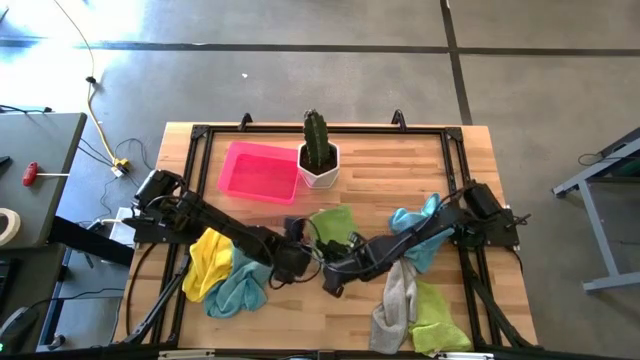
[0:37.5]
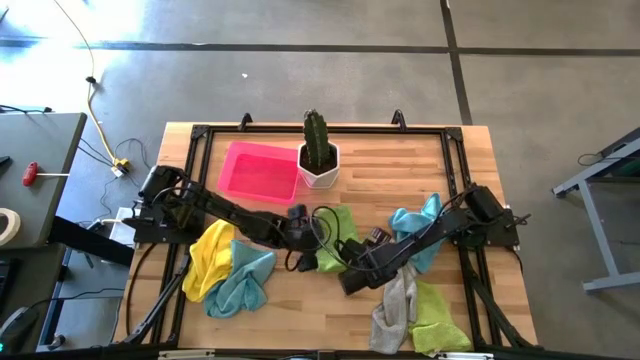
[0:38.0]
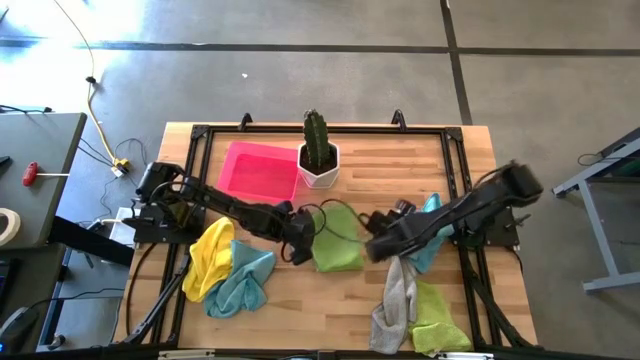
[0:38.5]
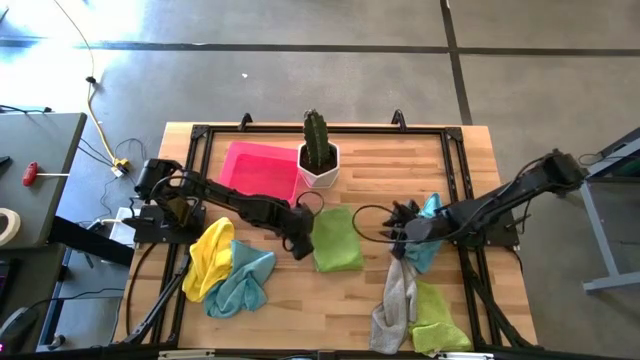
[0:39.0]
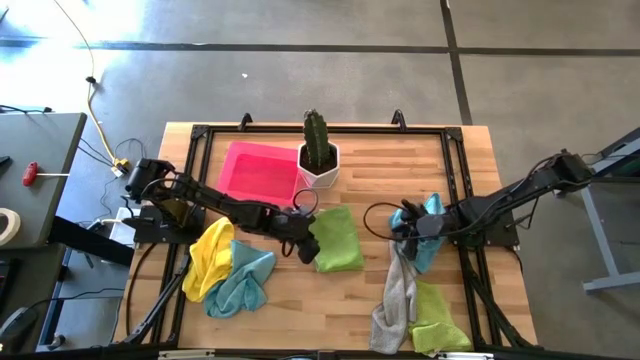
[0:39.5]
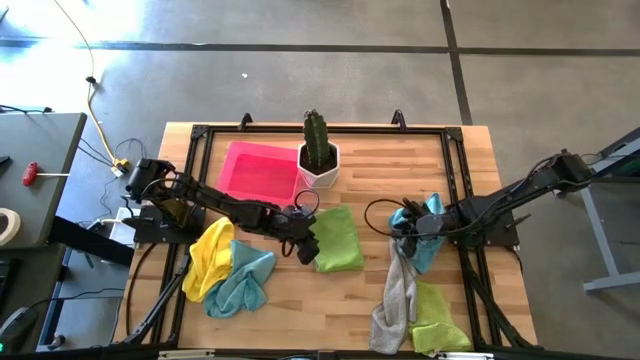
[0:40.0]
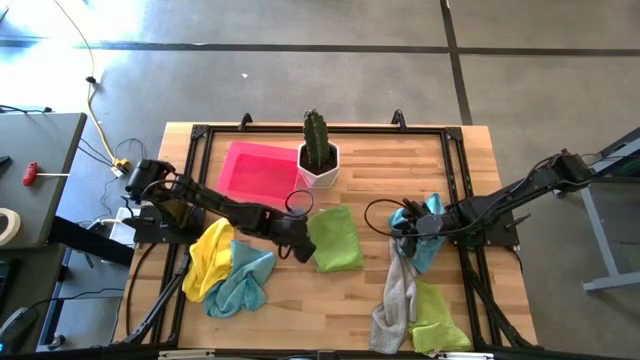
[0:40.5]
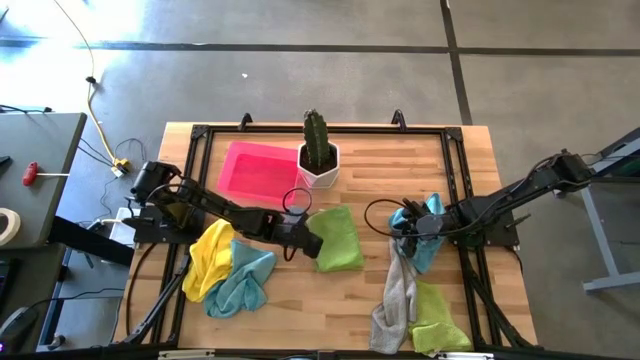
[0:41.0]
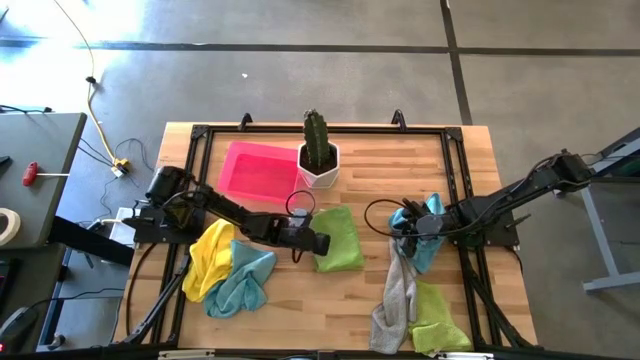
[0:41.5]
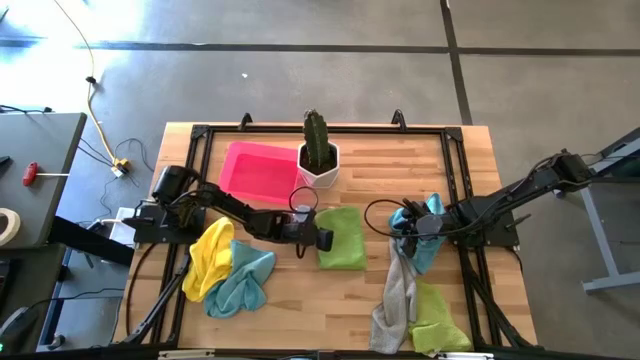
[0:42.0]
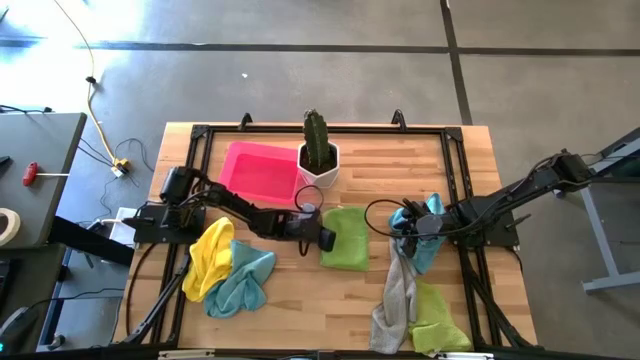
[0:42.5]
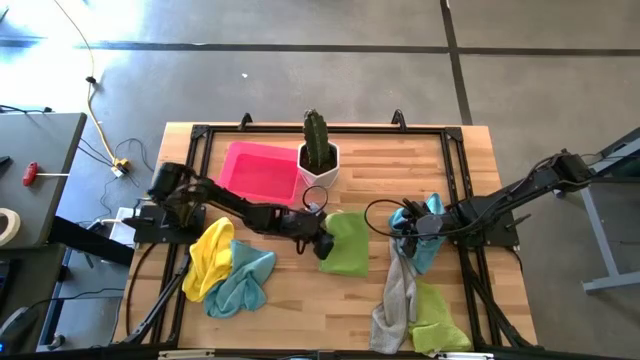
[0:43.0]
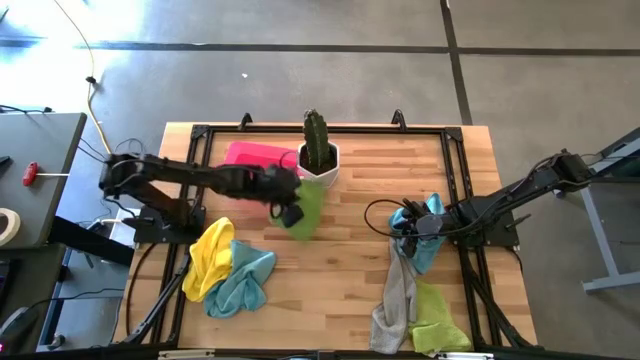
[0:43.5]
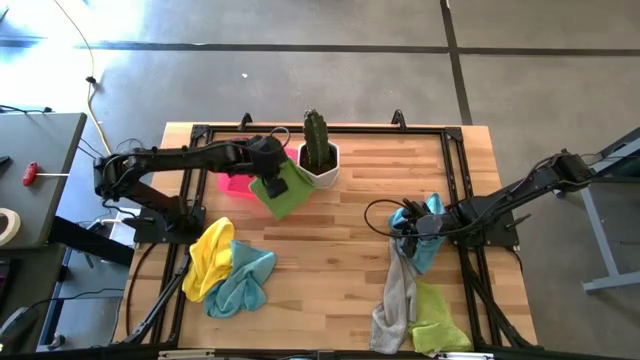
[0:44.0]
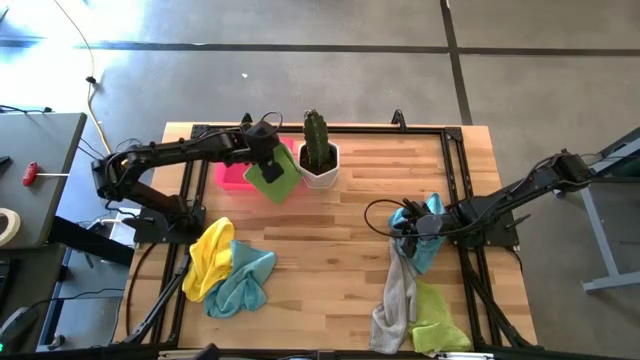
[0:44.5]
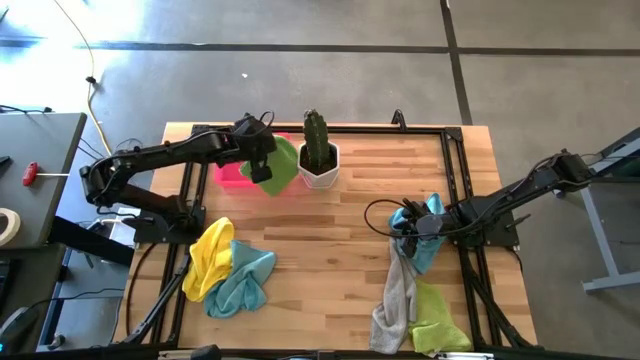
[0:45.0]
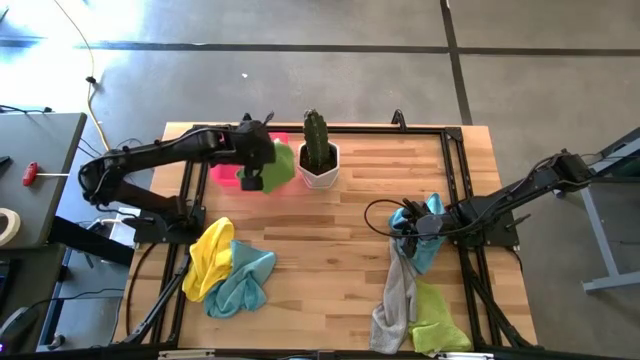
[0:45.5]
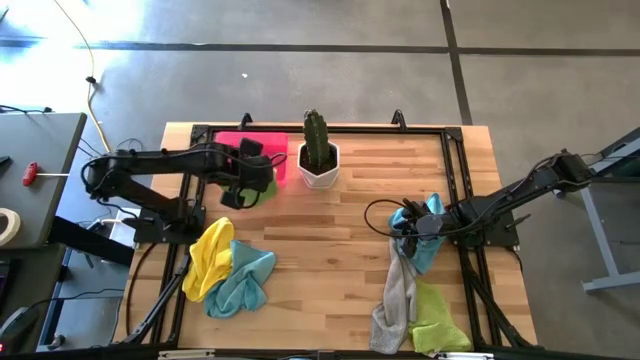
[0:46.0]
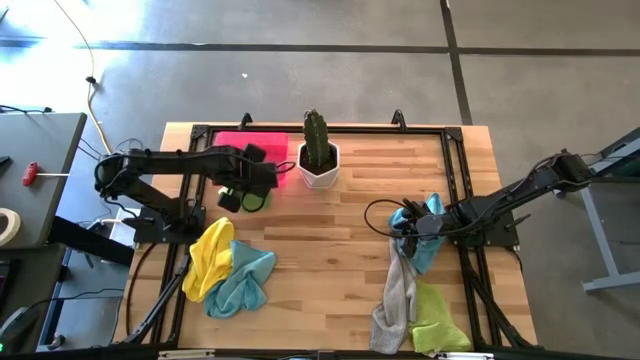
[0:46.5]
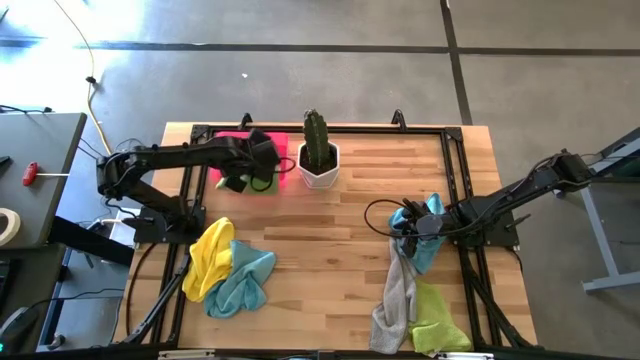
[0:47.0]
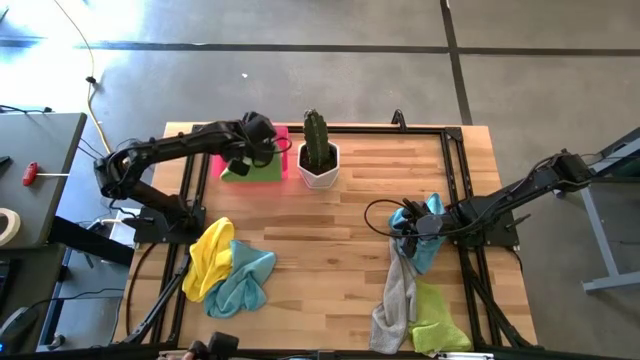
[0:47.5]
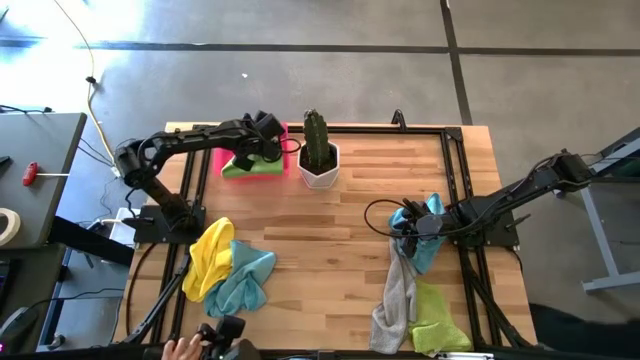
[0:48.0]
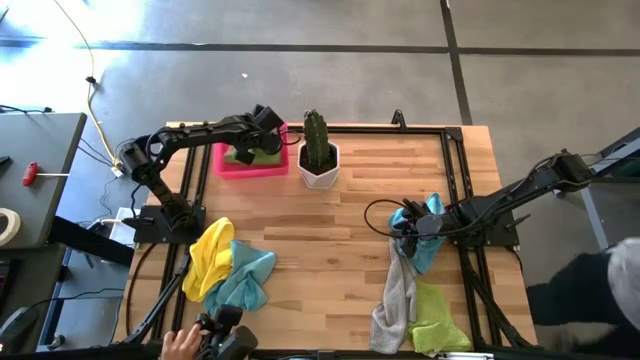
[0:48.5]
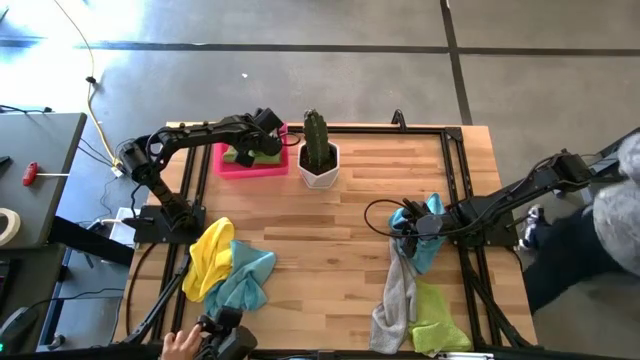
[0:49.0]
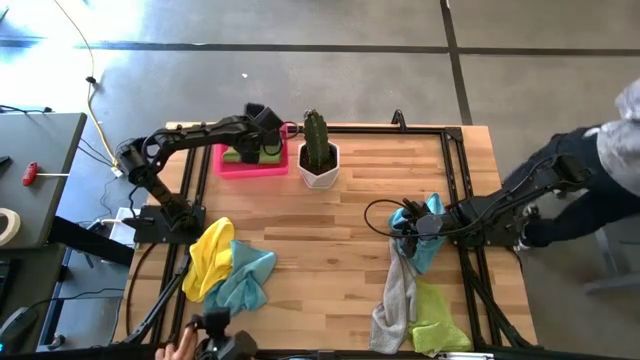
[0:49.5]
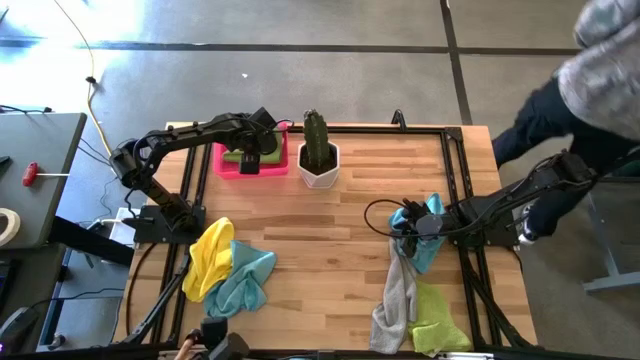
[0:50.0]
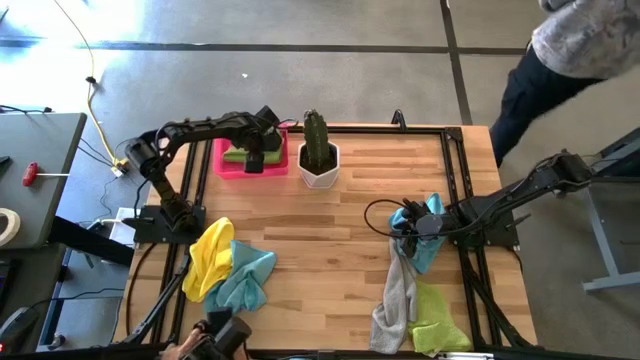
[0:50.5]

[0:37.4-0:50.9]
Task: Fold microfiber towels
Put the folded green microfiber towel into the pink bin

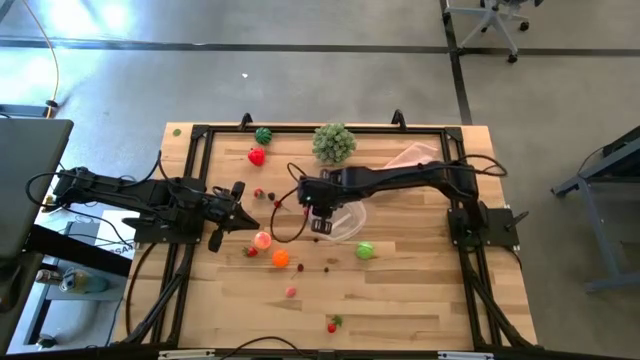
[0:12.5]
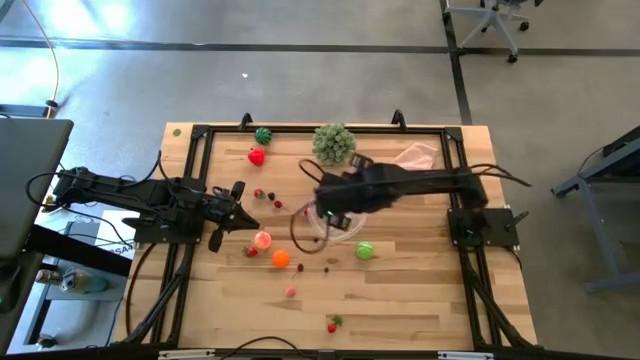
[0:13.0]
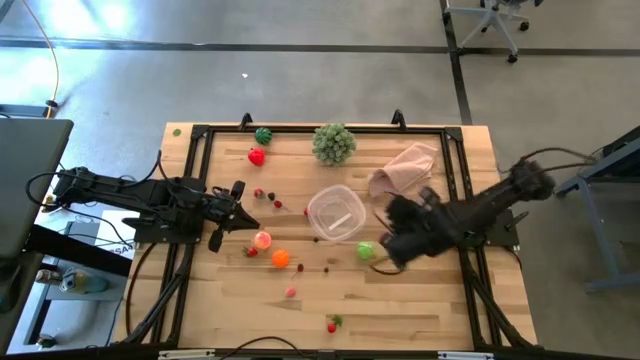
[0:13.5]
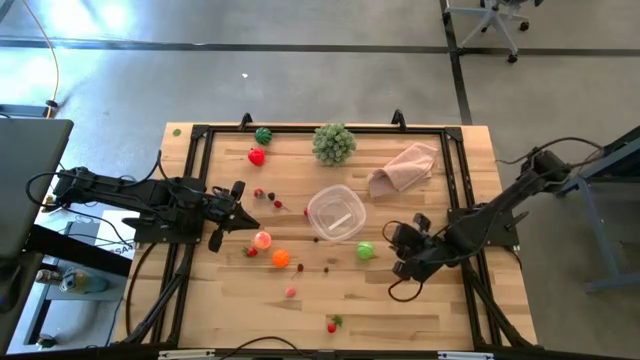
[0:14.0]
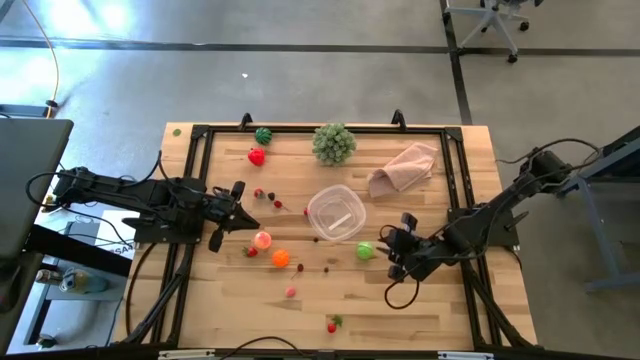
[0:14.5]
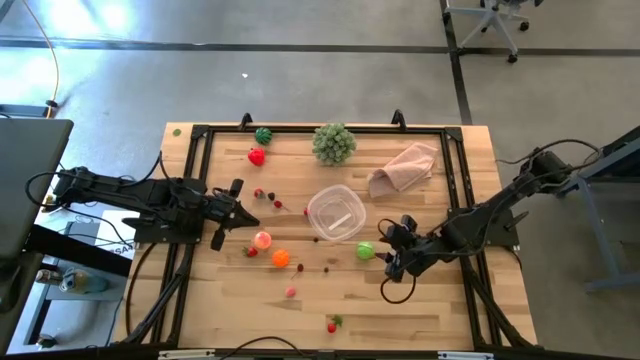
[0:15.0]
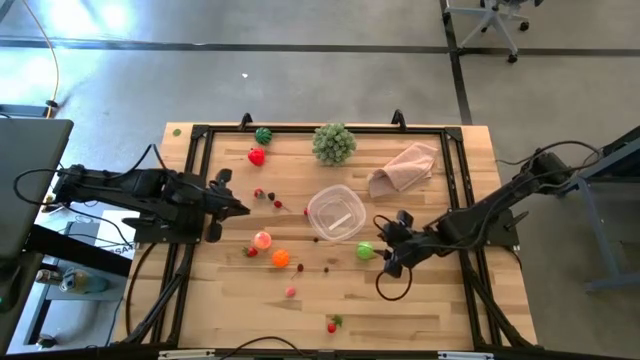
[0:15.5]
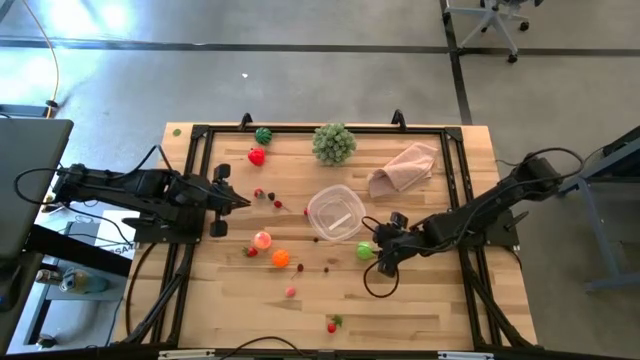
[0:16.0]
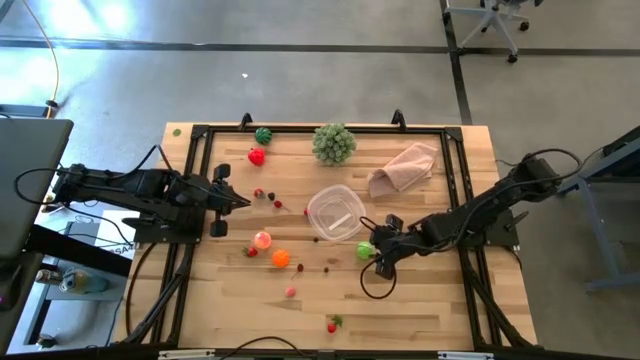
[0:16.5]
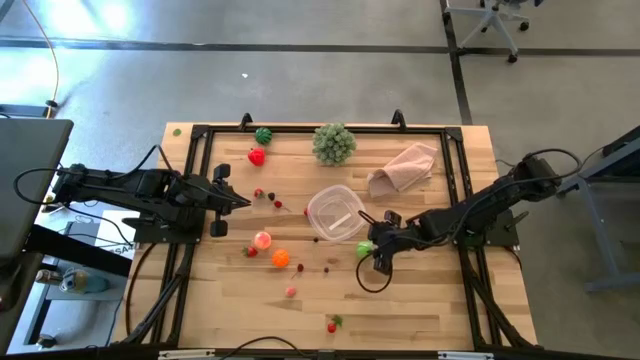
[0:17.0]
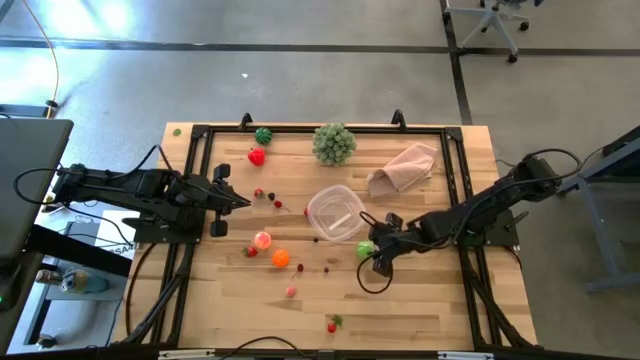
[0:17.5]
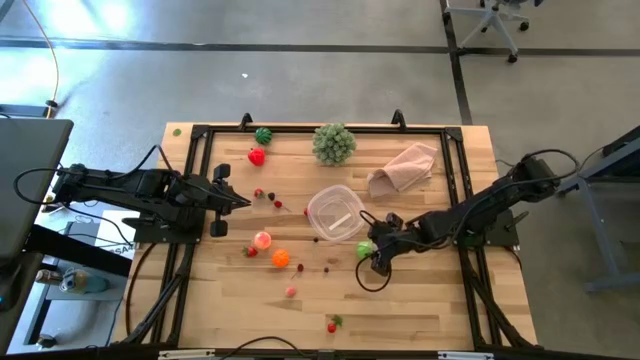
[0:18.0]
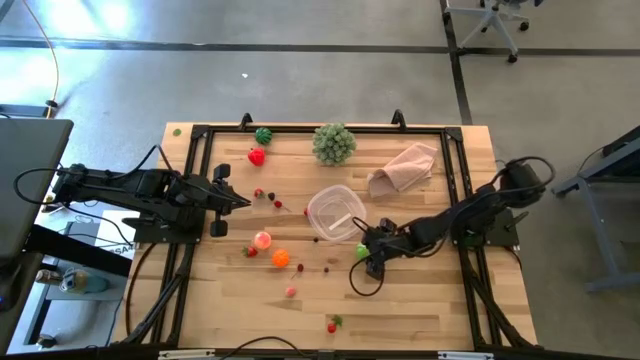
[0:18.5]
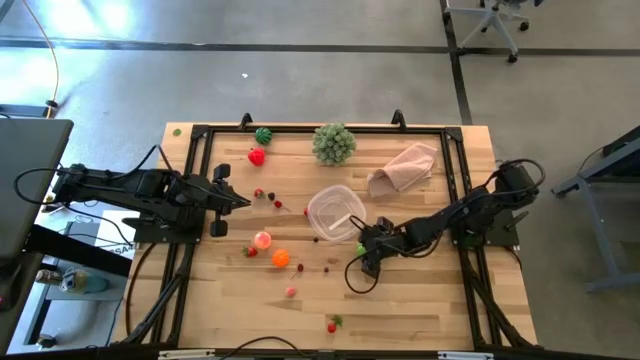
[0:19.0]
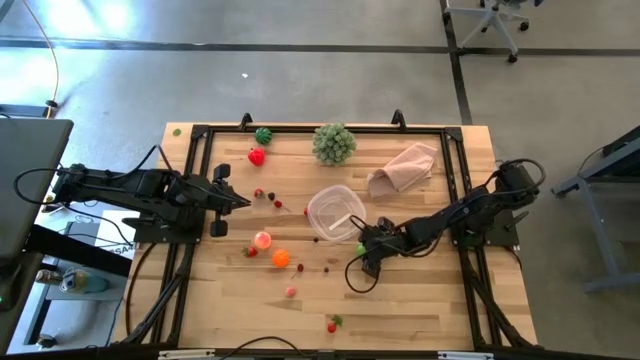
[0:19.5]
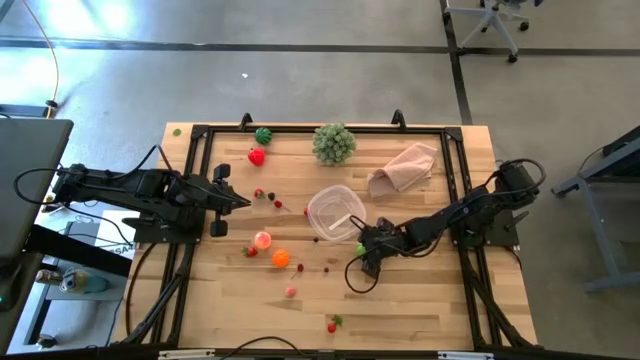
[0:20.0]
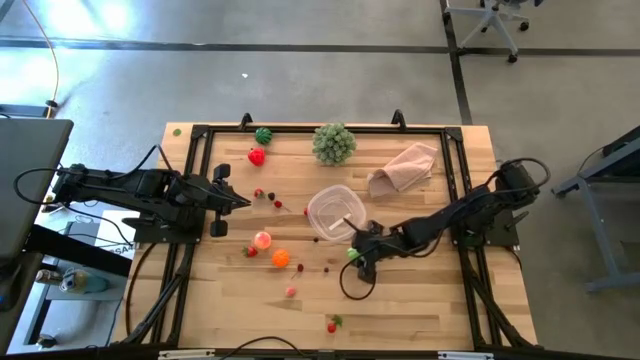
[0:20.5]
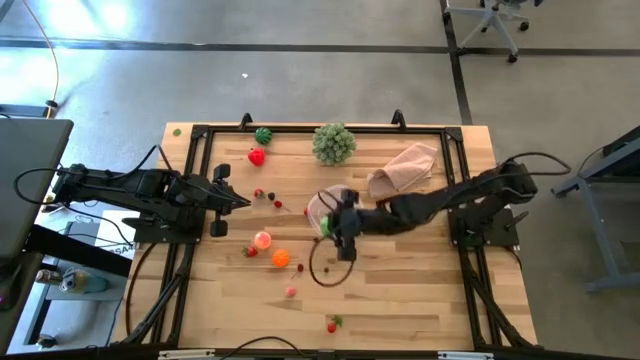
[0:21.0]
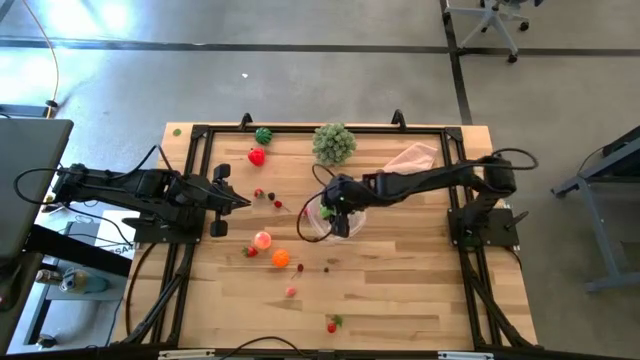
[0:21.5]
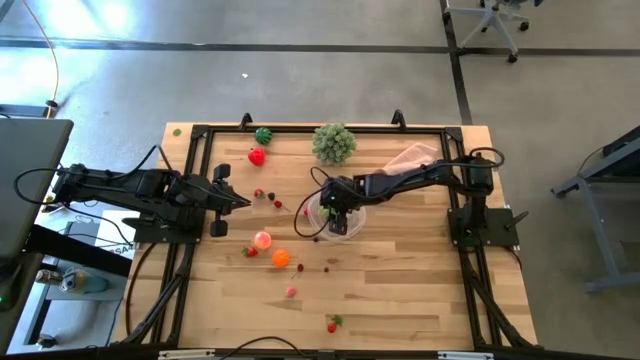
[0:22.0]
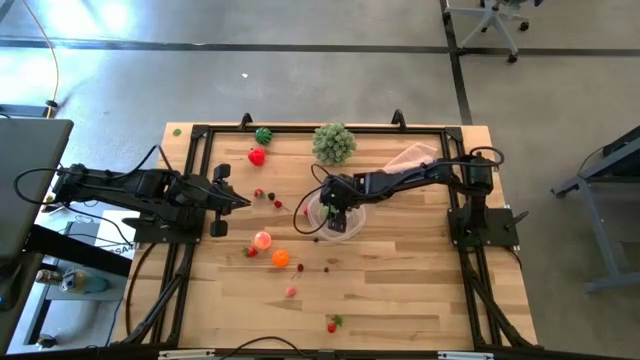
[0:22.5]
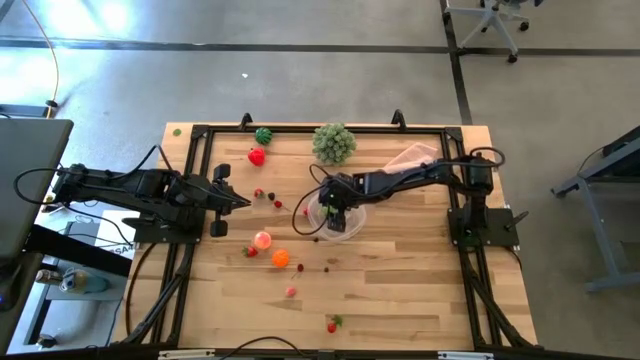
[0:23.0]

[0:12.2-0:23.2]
Task: Pick and placing Produce into tupperware
Put the cabbage into the container
